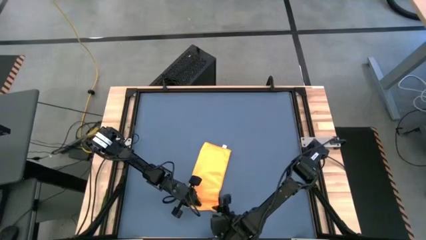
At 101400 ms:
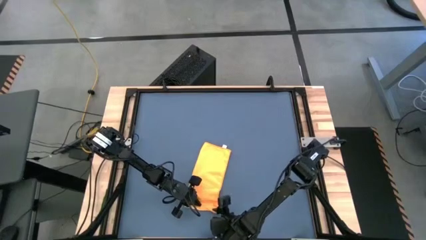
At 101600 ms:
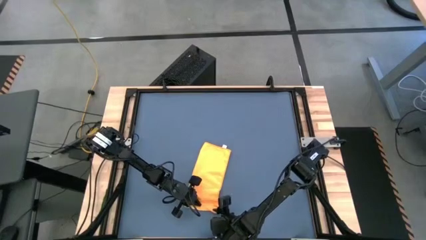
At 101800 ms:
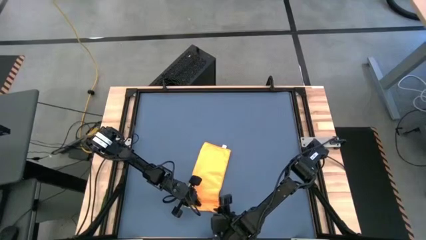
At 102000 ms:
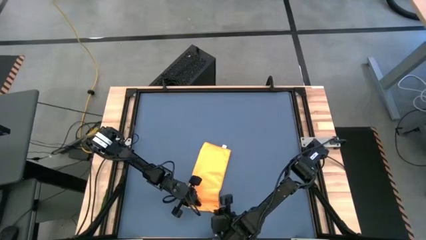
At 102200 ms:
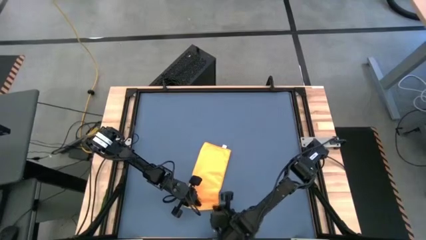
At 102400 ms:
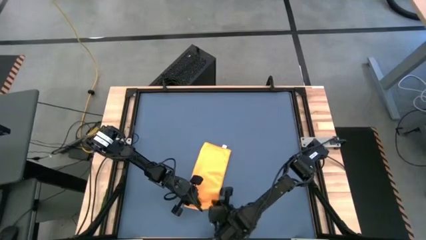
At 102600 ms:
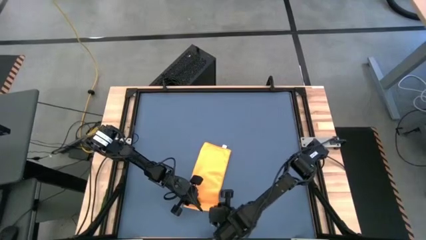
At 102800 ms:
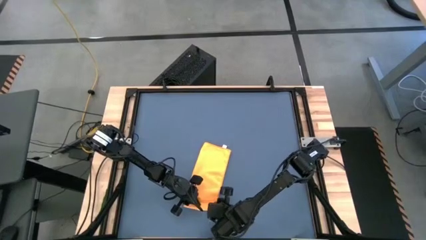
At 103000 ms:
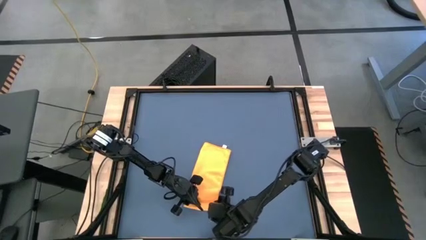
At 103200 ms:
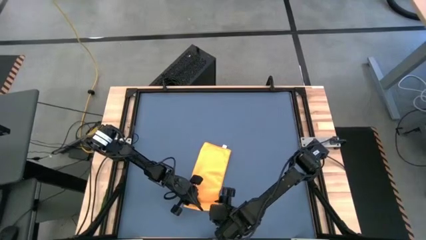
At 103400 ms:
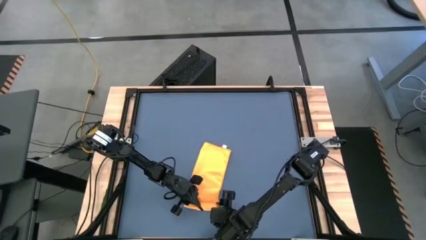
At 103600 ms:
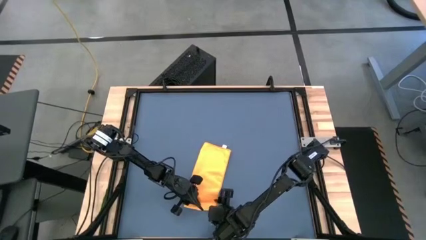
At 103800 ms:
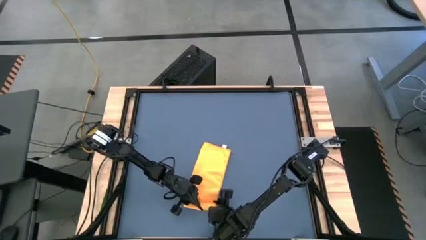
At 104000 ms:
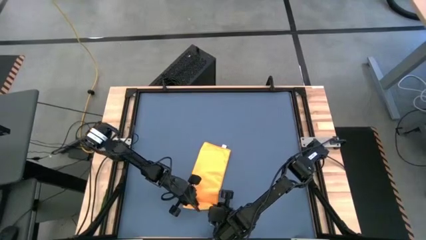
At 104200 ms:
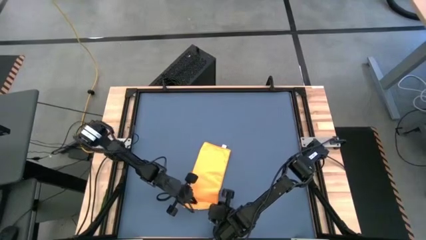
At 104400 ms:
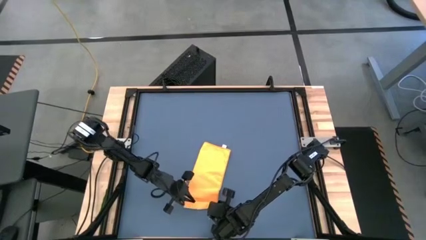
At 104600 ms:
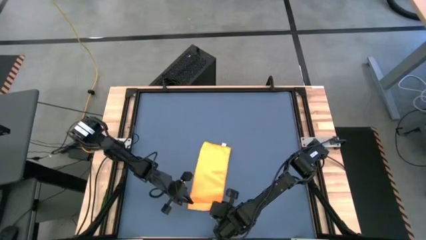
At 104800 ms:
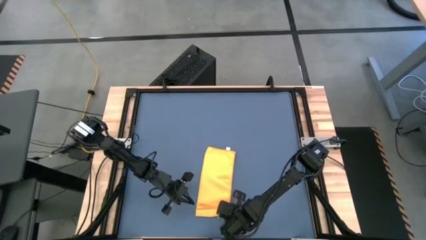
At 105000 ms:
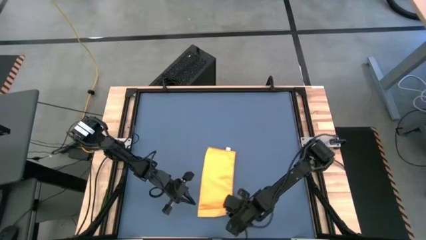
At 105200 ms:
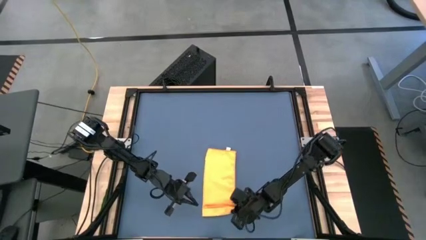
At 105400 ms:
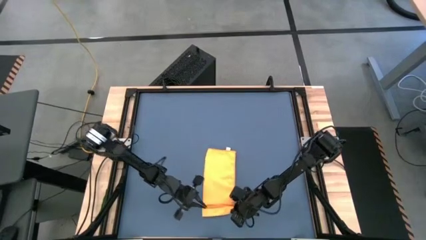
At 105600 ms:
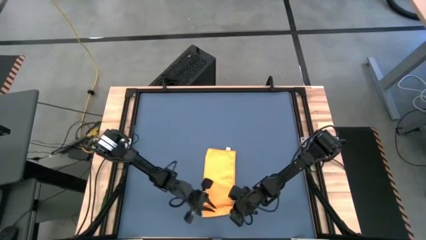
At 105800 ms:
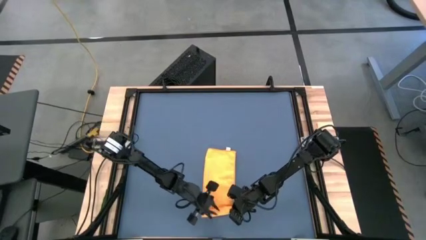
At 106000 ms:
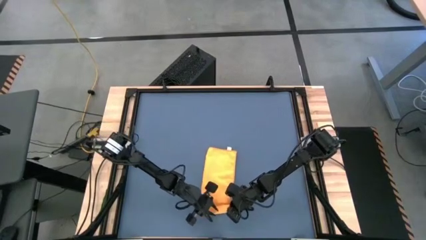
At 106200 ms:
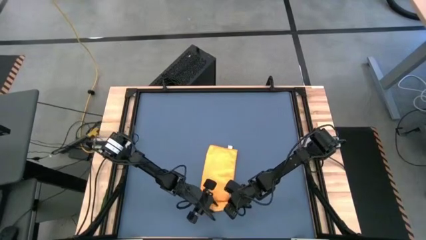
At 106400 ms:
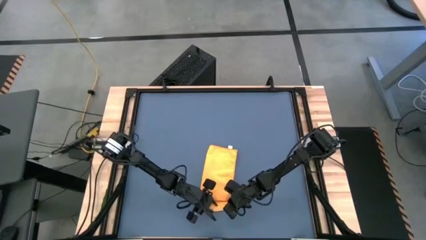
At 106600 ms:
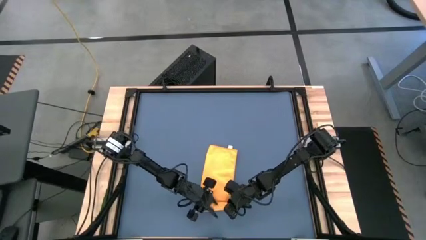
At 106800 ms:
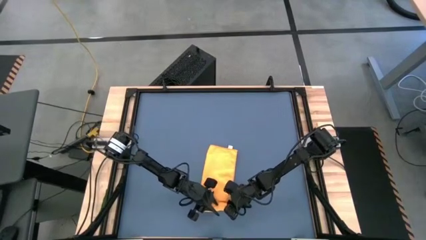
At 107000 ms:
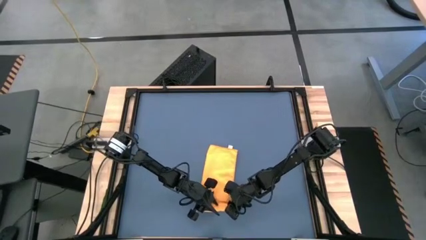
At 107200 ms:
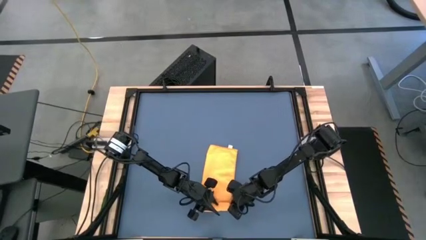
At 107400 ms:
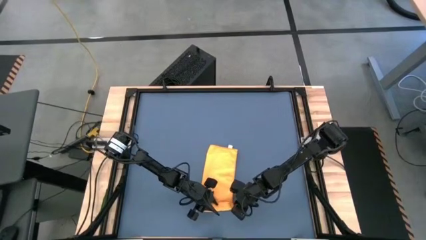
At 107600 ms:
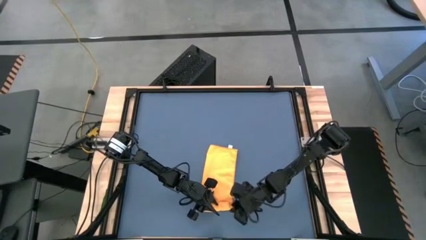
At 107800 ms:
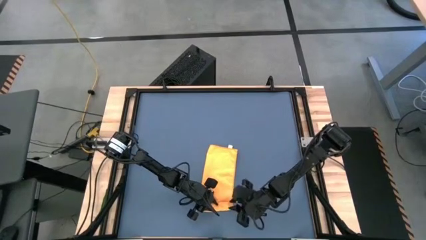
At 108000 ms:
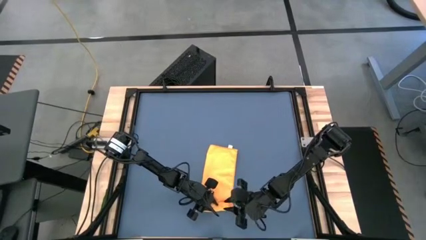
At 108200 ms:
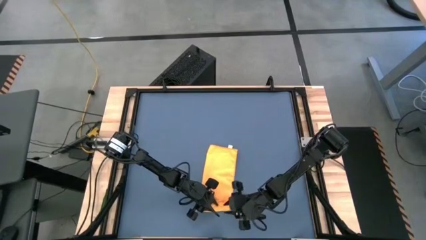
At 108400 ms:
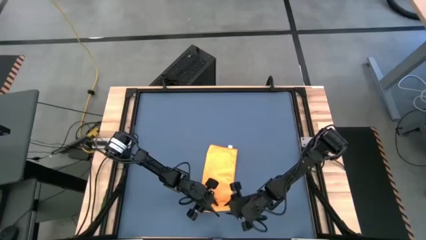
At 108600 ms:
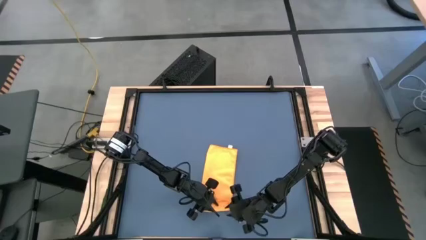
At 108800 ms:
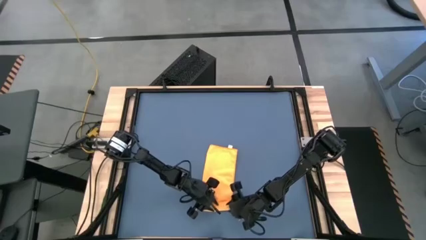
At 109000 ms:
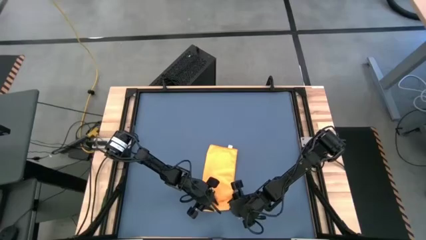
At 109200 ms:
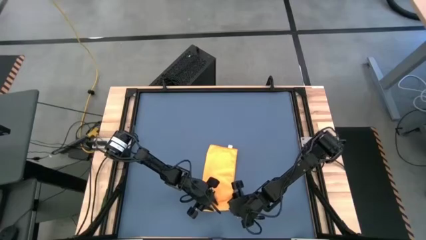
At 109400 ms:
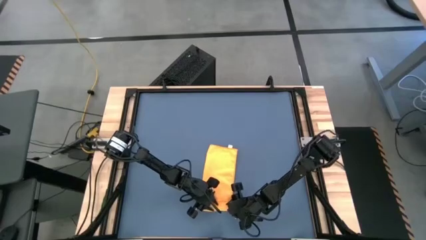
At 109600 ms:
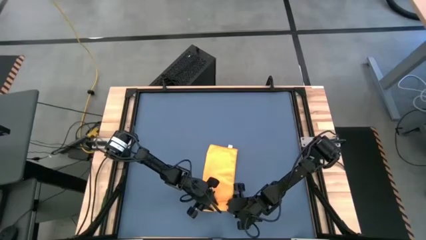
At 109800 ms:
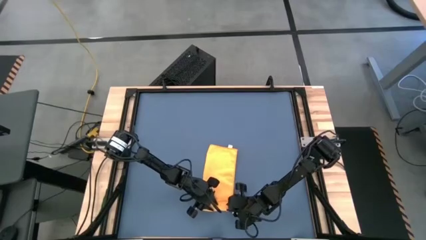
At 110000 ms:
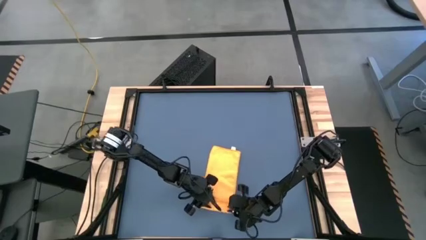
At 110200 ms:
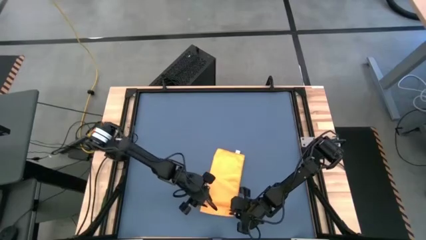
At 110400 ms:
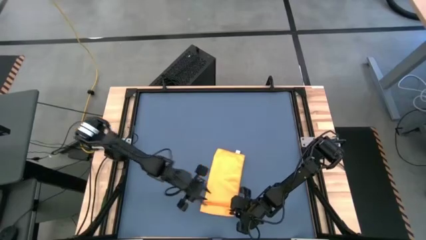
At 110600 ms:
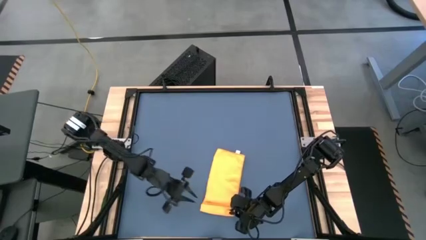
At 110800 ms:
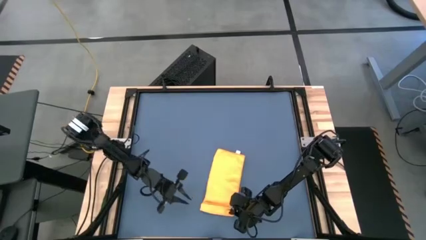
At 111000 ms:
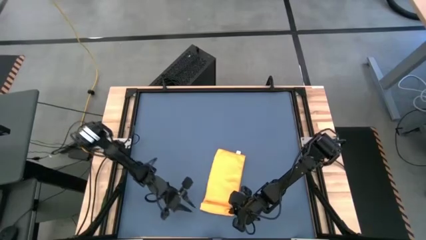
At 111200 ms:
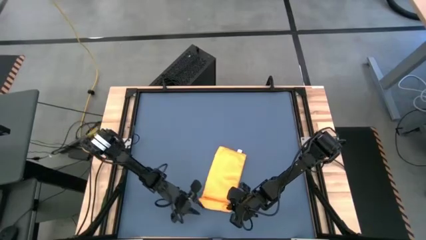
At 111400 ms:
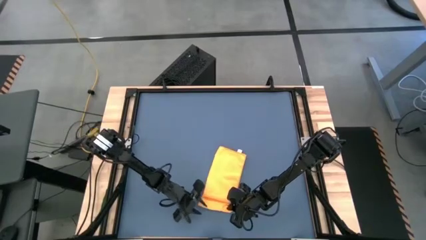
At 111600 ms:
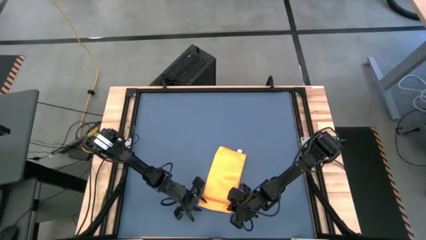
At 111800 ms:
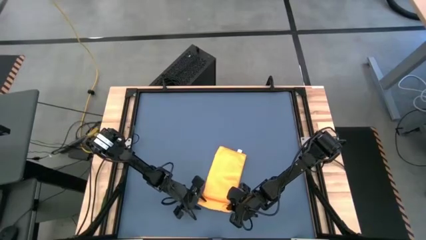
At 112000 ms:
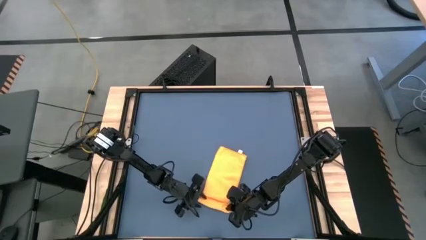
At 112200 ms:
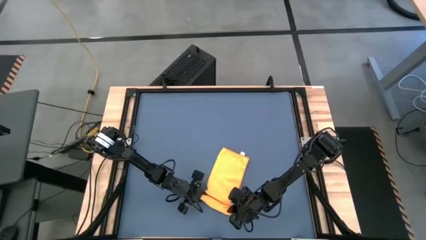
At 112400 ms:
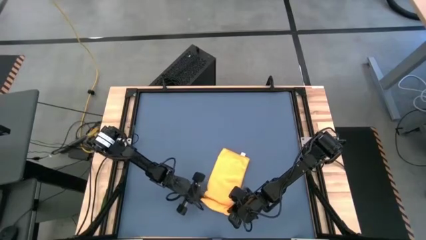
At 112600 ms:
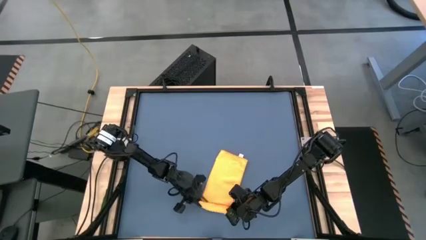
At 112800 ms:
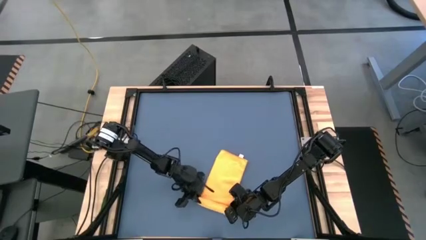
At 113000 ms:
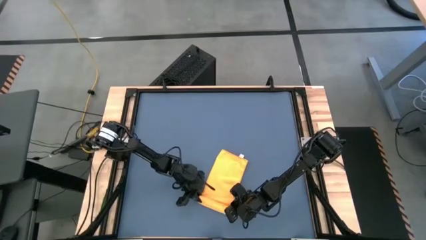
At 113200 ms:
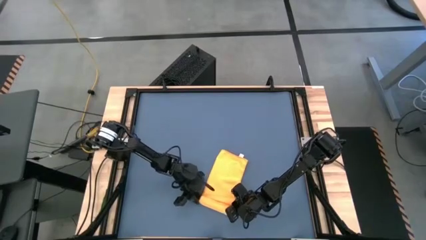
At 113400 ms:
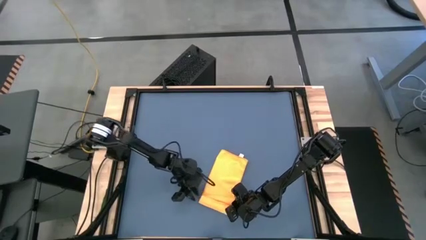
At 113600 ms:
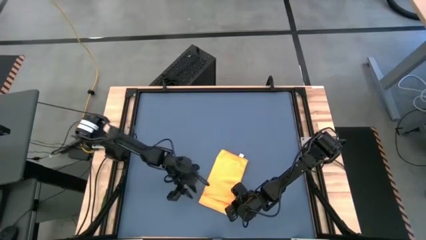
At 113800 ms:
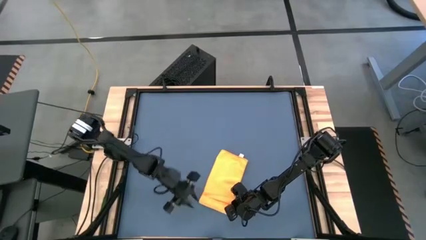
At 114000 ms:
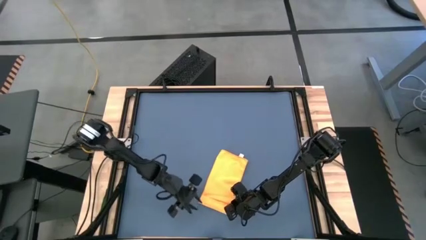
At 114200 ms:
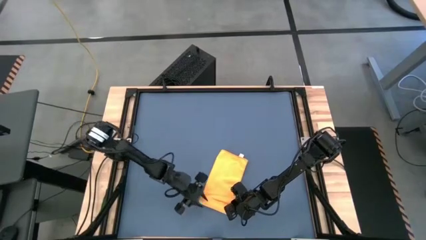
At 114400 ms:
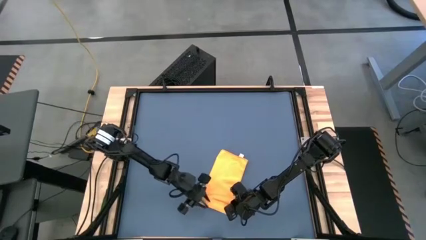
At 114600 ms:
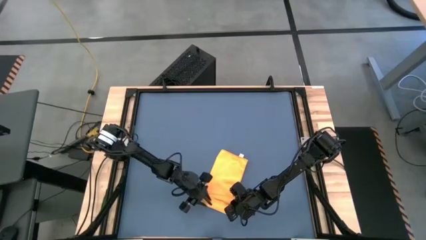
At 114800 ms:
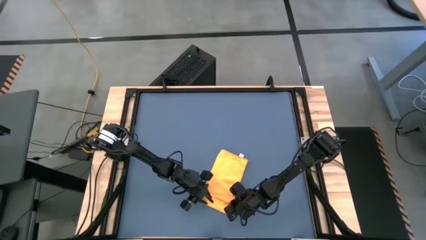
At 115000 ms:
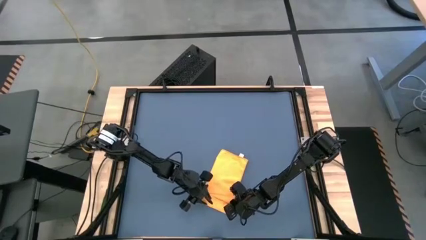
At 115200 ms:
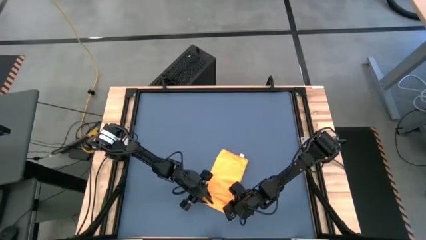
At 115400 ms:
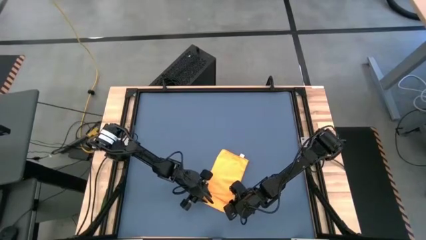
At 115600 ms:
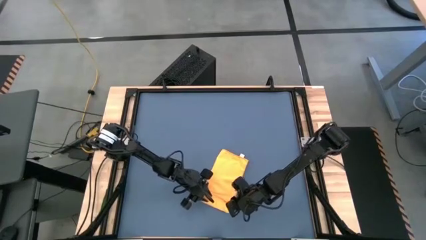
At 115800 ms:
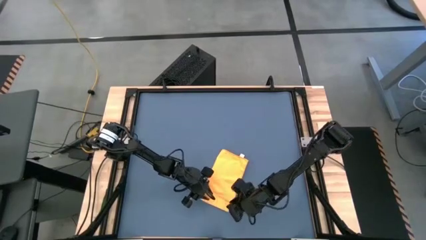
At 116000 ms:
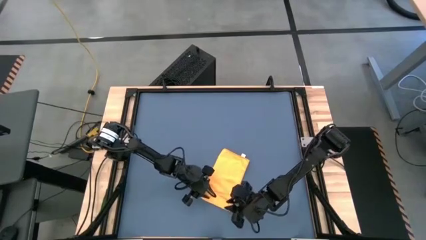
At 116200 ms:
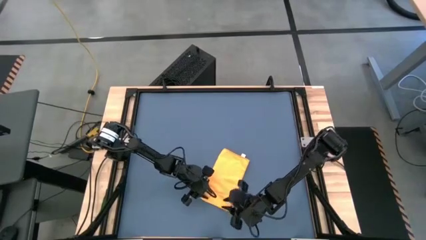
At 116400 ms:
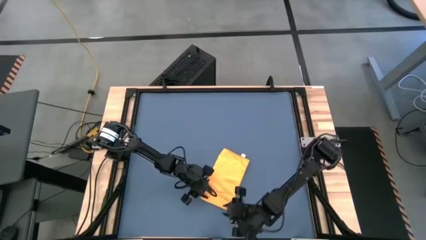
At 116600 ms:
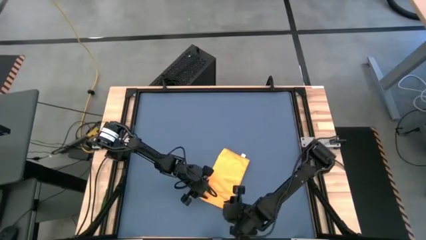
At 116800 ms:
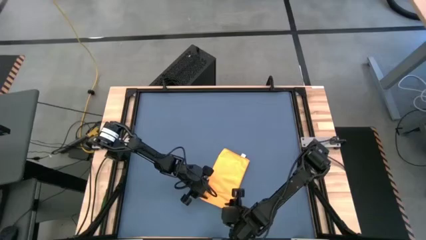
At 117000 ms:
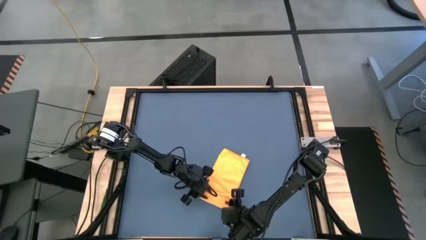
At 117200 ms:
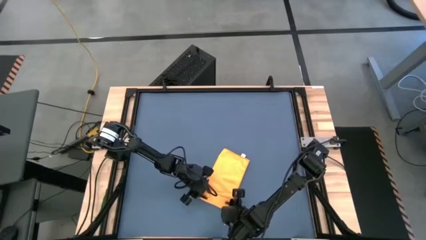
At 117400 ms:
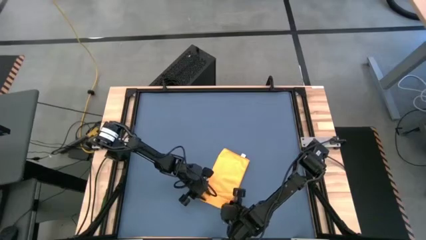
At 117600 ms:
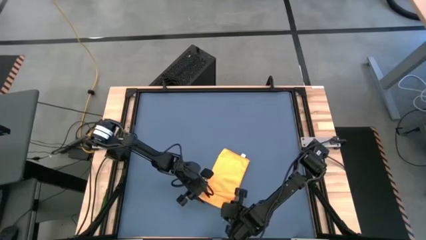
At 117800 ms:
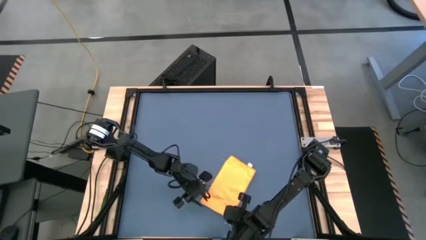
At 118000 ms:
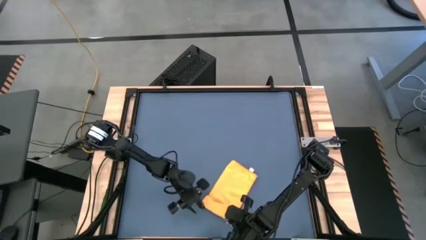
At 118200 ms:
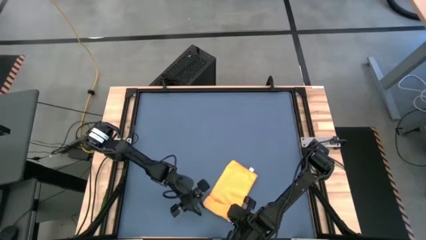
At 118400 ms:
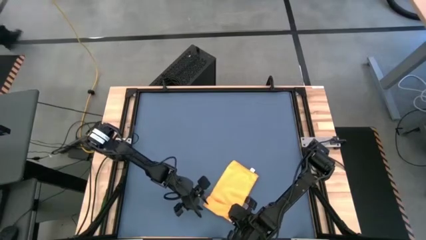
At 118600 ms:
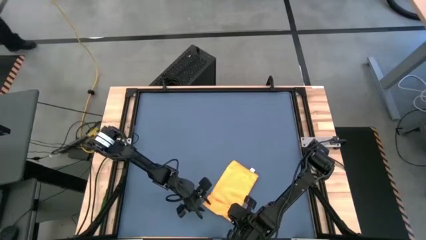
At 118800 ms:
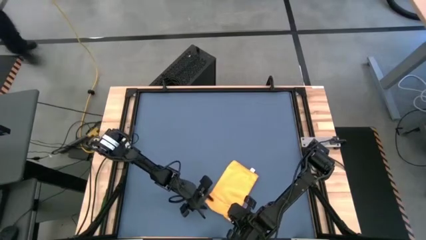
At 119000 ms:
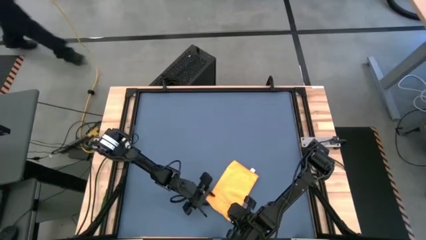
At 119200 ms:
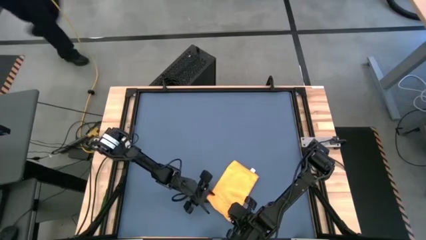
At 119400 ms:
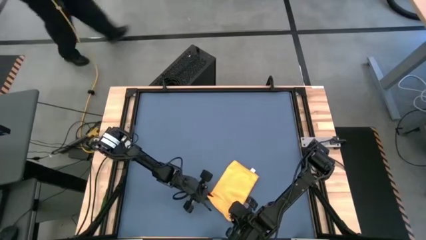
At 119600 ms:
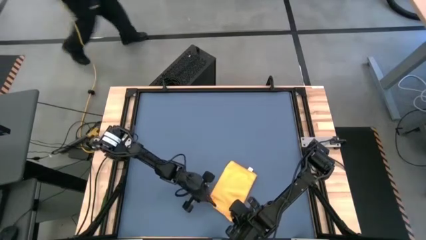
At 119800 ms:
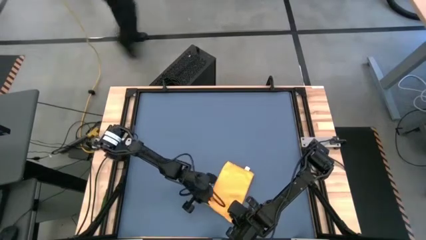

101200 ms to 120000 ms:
Task: Roll towel
Roll the yellow microfiber cloth
